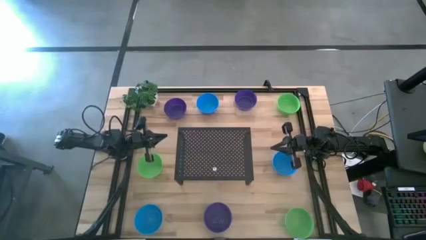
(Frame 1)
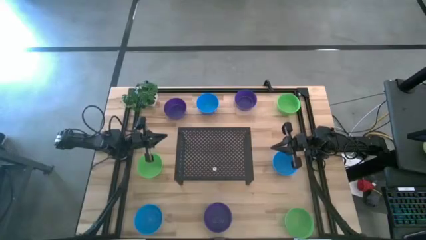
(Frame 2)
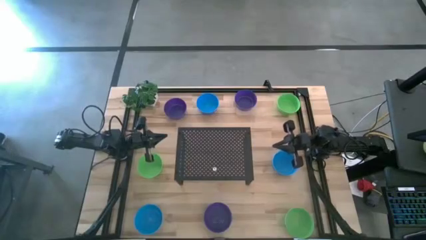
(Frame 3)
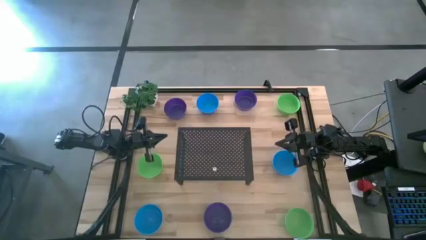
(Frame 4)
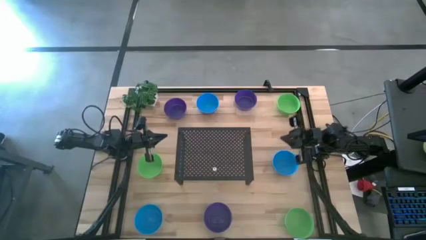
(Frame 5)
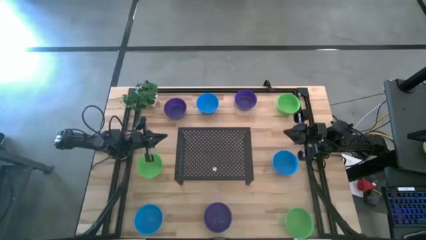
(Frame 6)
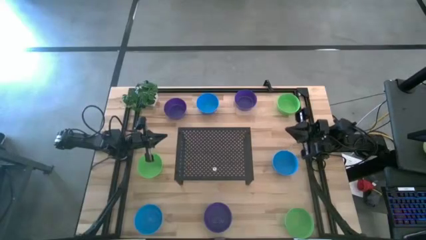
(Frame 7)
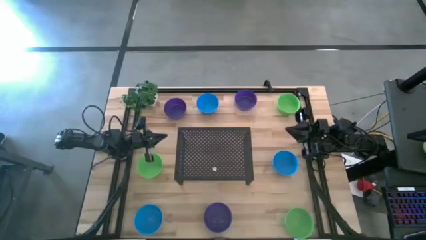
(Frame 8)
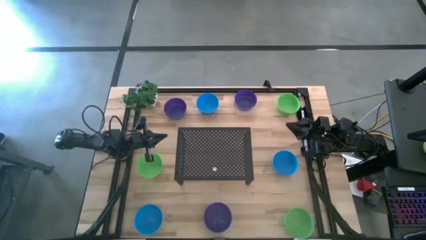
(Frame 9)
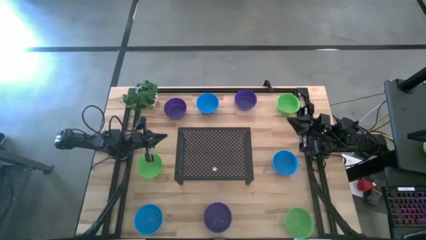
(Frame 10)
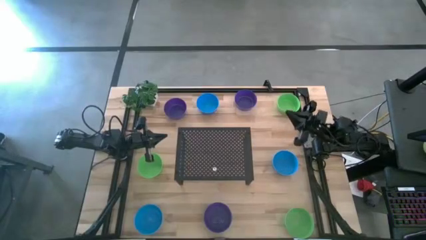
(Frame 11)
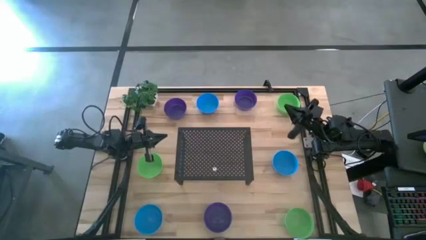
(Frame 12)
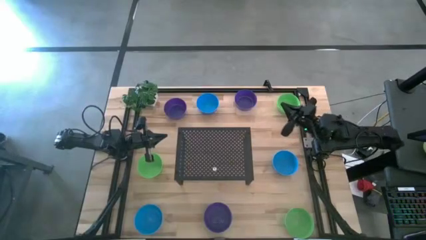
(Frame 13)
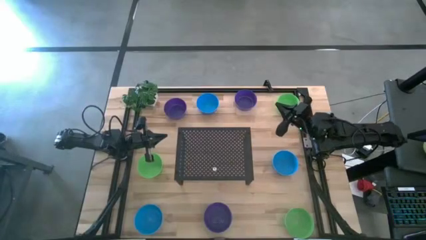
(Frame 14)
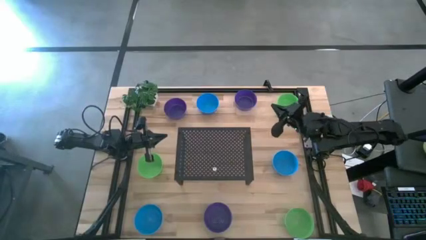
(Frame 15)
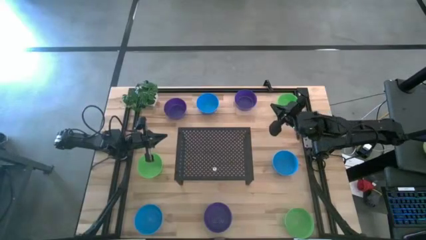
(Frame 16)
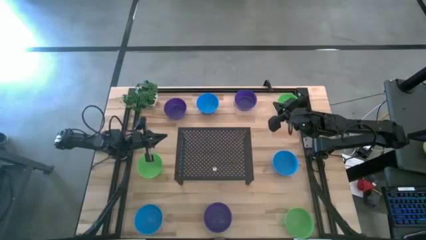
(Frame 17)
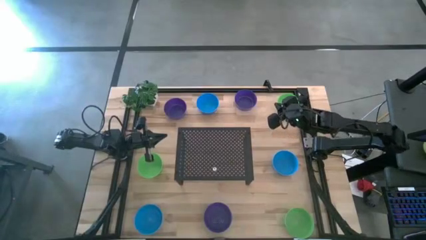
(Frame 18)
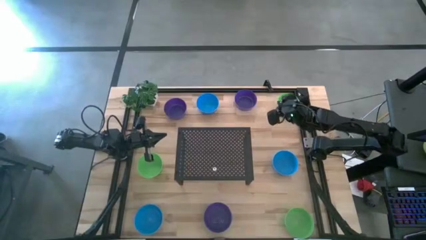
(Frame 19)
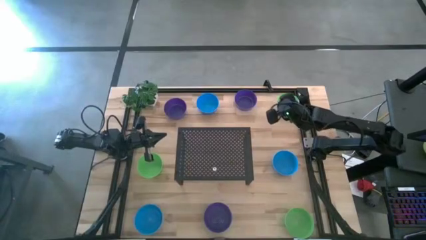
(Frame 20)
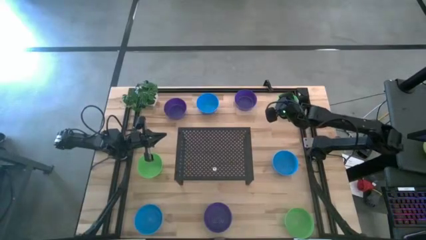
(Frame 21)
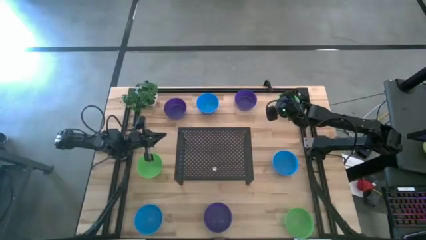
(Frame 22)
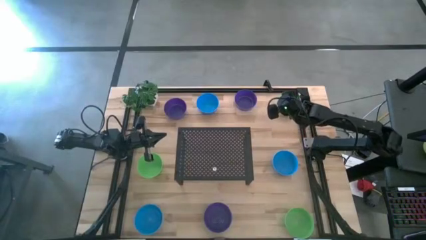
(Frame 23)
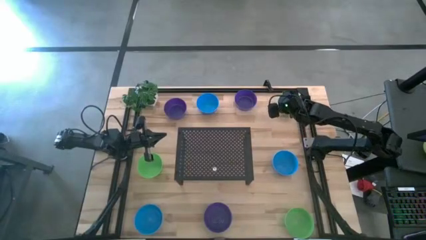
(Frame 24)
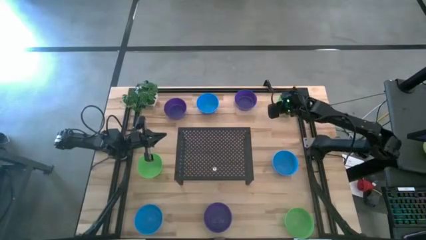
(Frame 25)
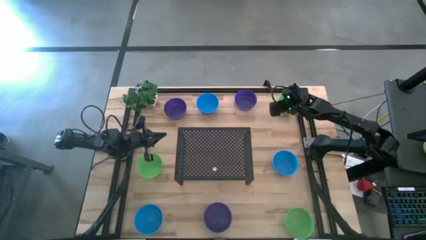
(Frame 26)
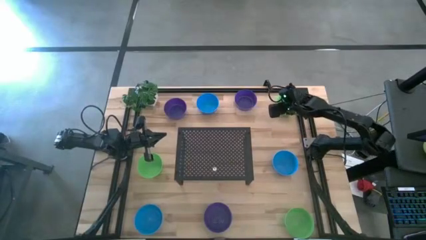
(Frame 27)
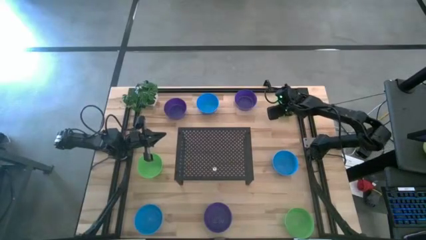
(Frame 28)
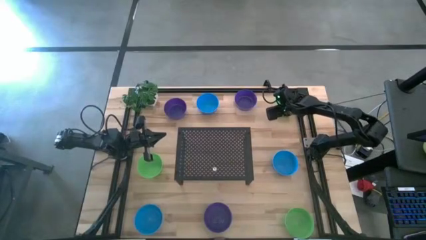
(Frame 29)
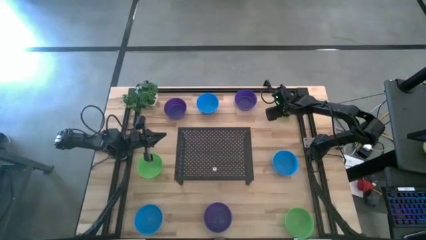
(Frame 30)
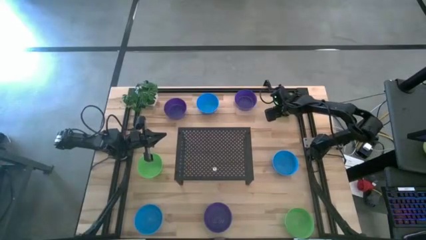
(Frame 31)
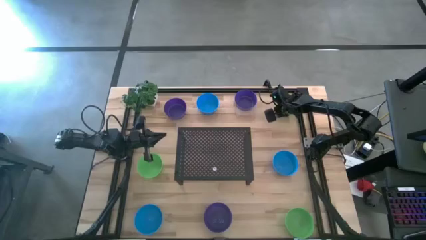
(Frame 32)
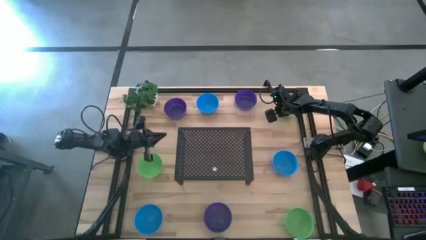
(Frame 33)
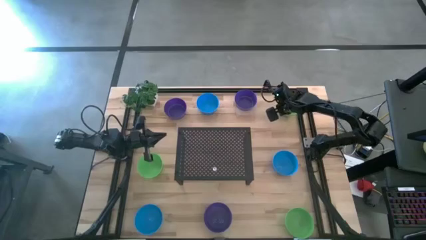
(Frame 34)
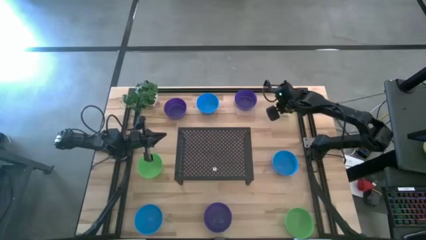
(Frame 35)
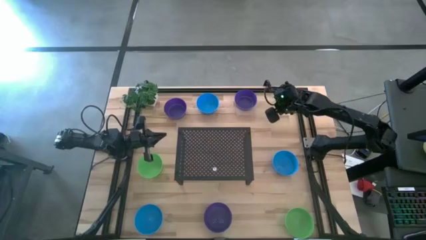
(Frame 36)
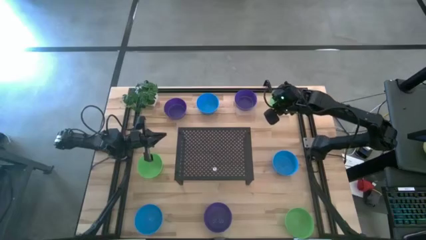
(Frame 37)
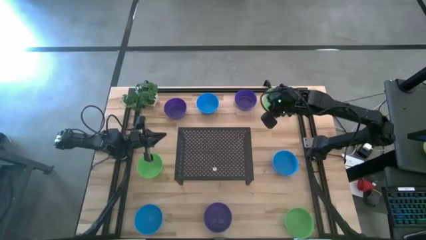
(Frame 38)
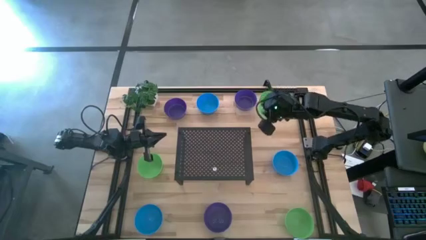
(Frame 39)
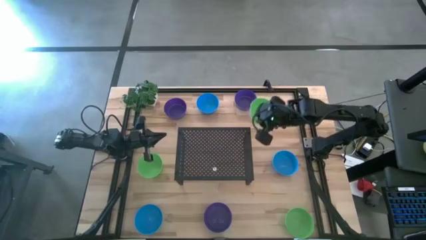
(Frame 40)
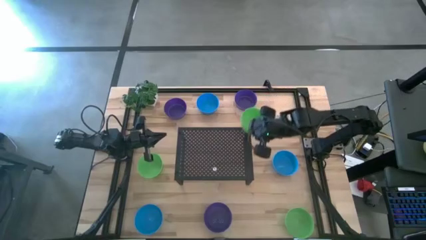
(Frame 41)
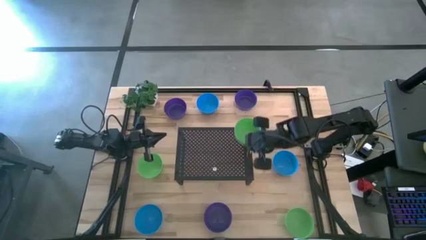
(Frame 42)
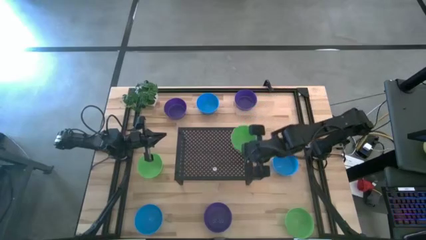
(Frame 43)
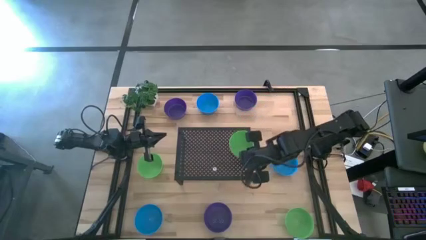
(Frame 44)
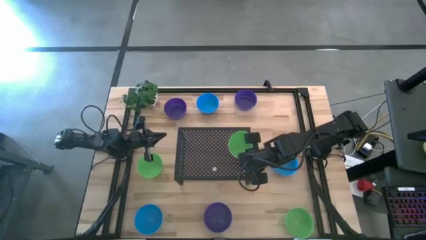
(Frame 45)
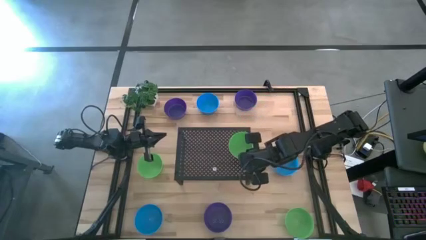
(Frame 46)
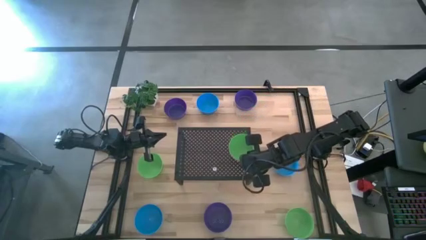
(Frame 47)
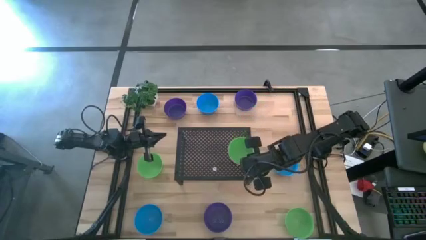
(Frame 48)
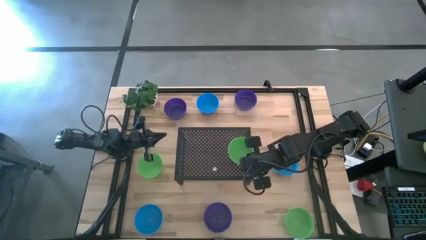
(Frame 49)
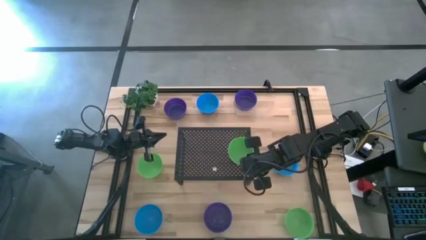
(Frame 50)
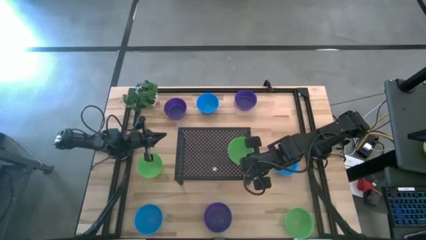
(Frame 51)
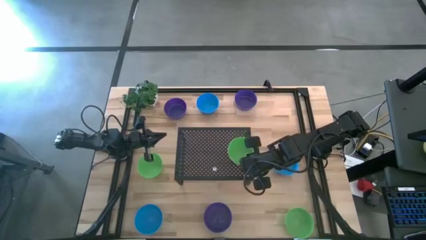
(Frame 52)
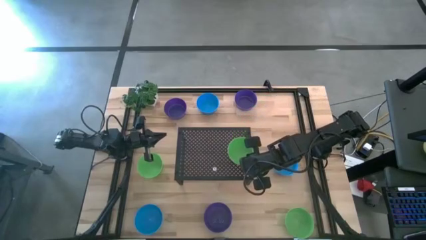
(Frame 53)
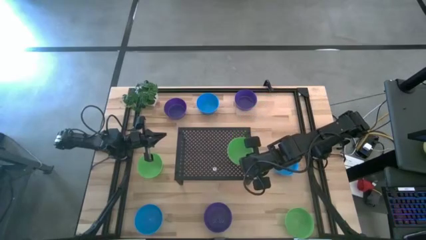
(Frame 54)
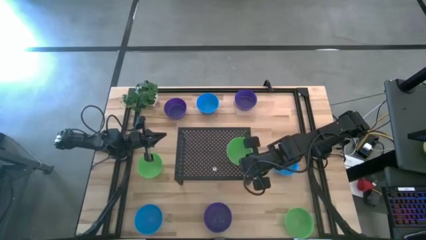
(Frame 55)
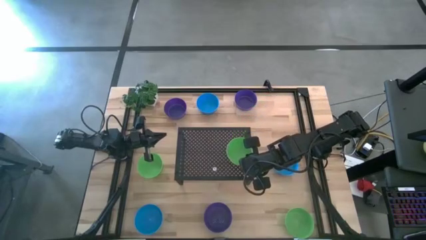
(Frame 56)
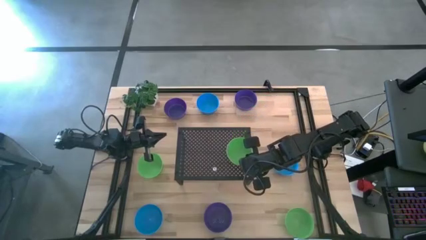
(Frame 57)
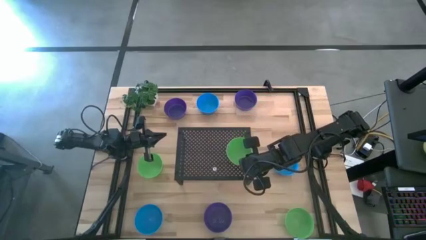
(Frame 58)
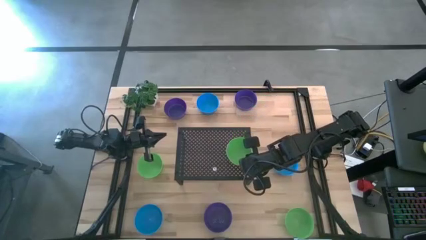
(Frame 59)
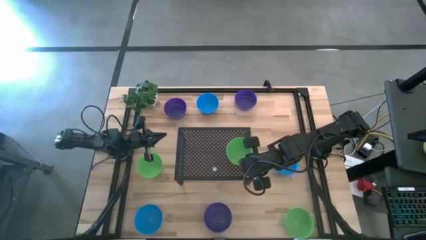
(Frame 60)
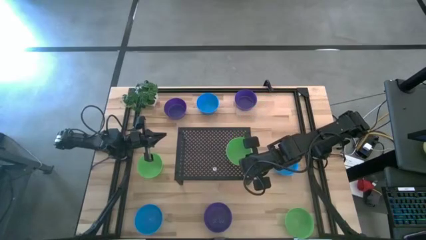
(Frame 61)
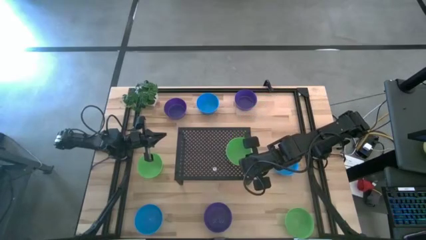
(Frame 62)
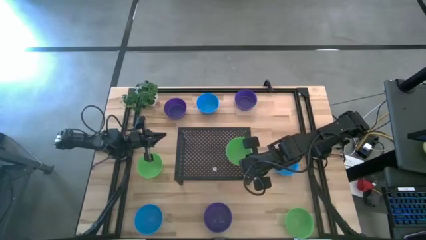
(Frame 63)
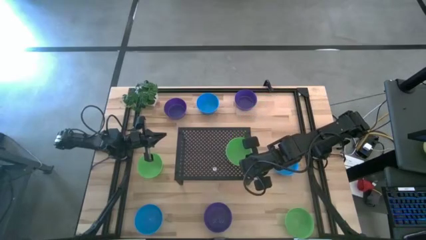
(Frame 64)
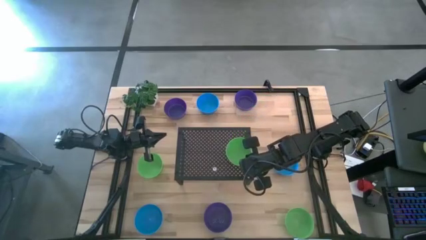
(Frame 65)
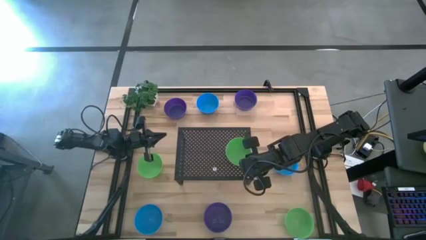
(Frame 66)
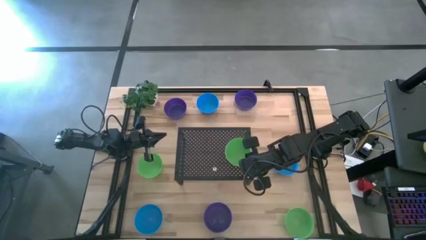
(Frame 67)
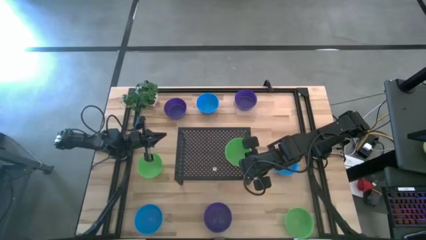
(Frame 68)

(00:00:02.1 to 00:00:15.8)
Task: Pick & Place Mini bowls
Put the top right green bowl on the shelf
